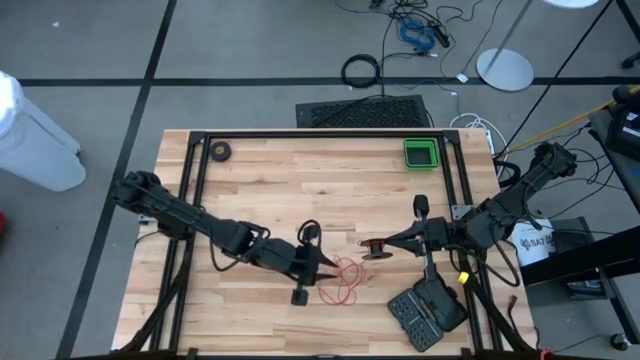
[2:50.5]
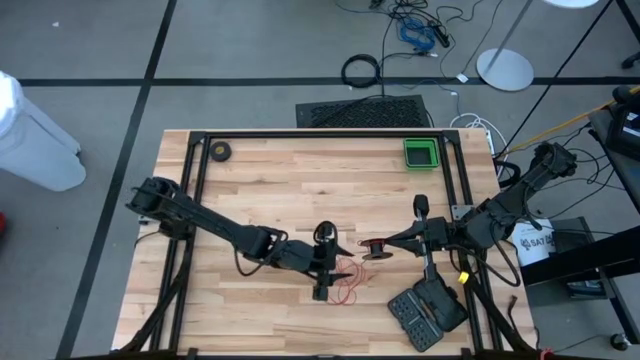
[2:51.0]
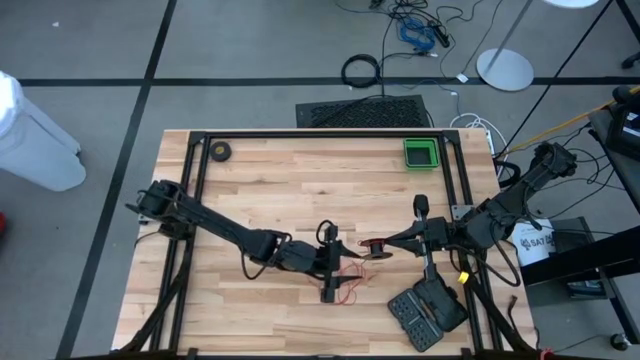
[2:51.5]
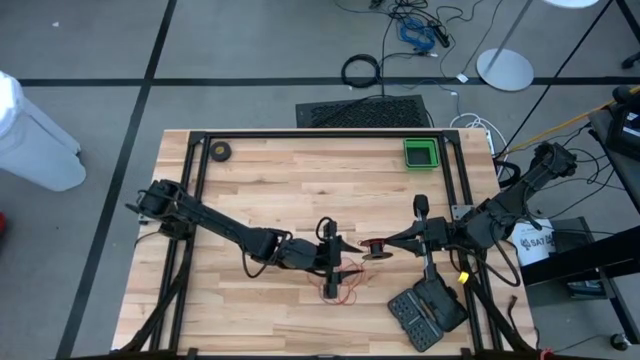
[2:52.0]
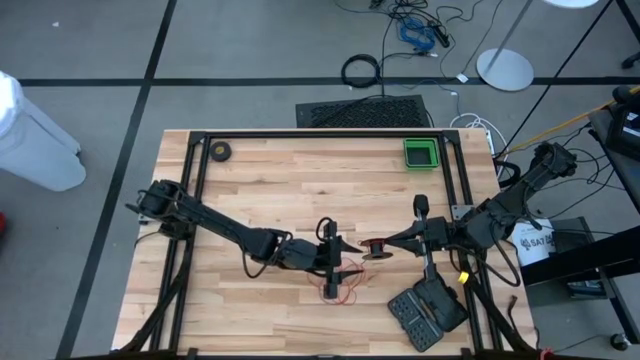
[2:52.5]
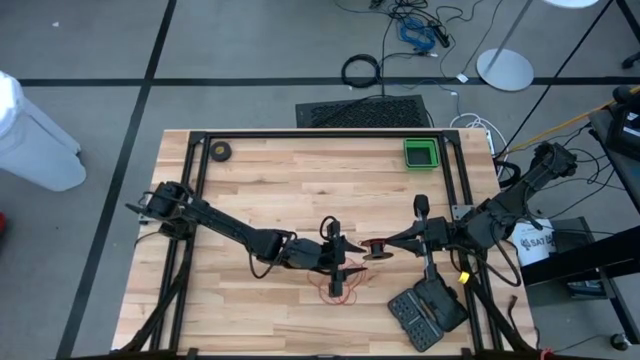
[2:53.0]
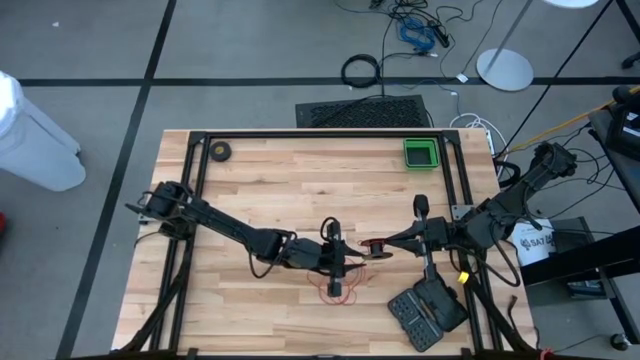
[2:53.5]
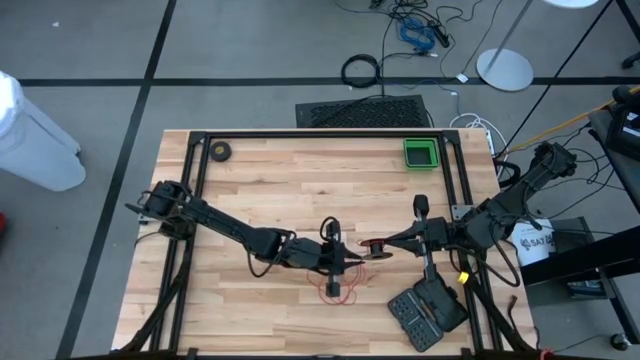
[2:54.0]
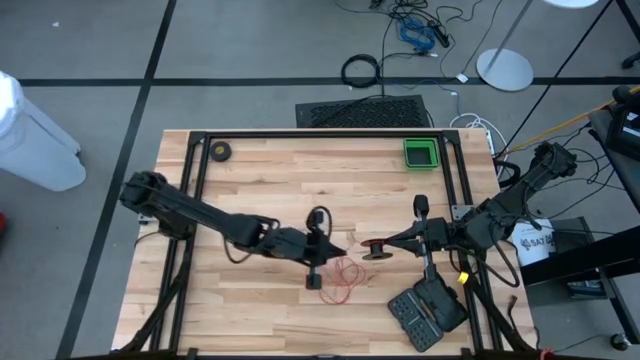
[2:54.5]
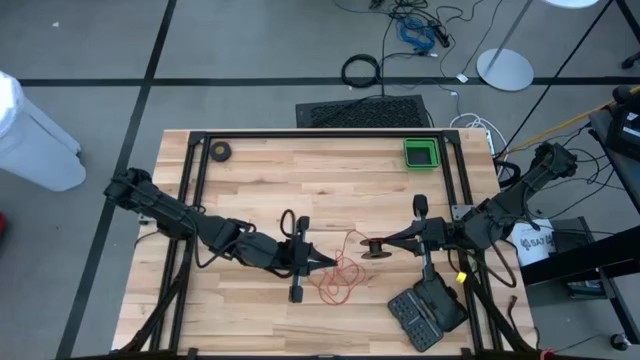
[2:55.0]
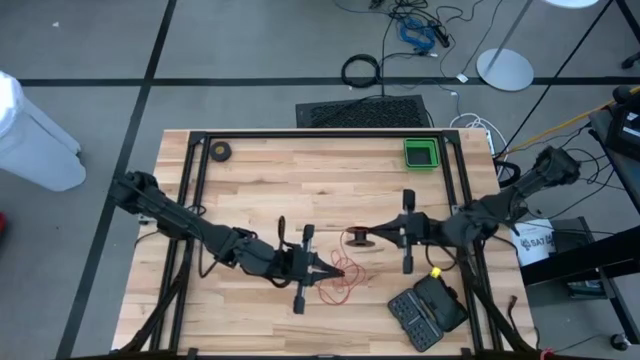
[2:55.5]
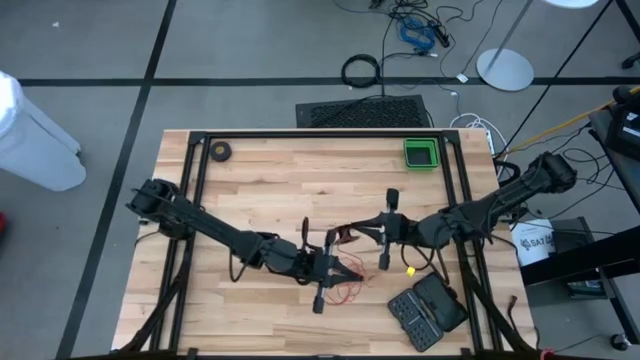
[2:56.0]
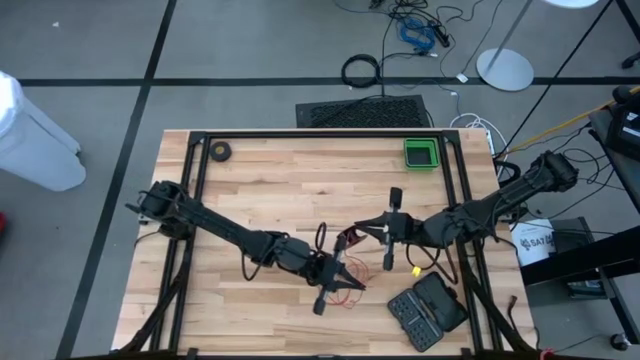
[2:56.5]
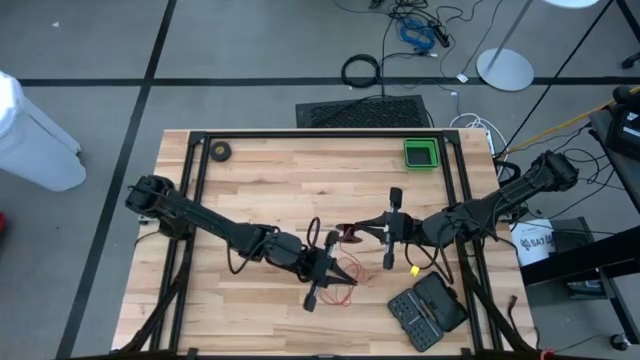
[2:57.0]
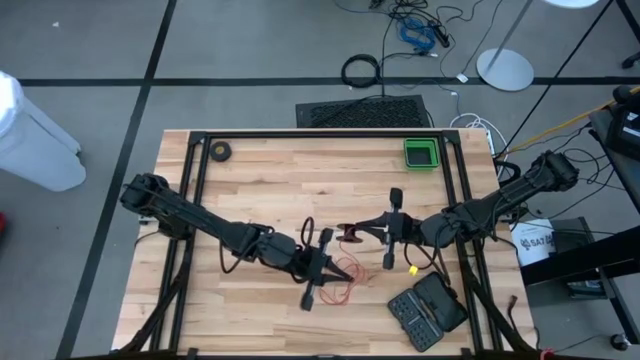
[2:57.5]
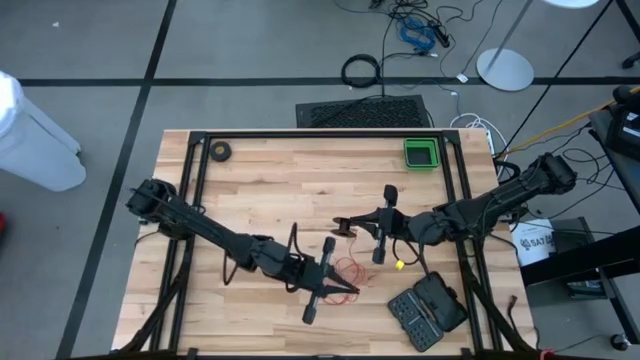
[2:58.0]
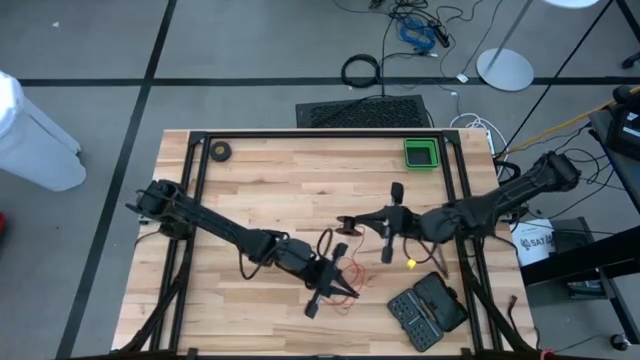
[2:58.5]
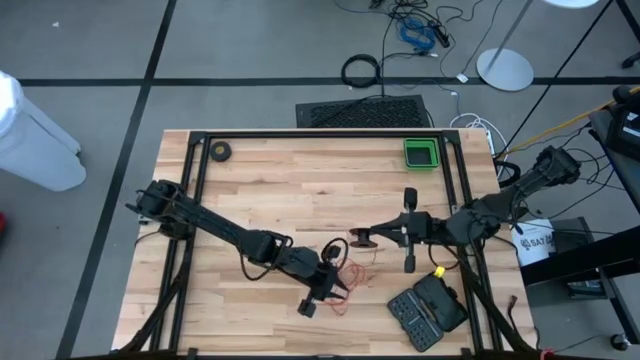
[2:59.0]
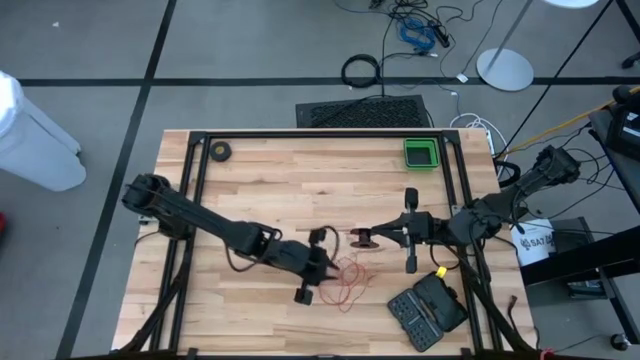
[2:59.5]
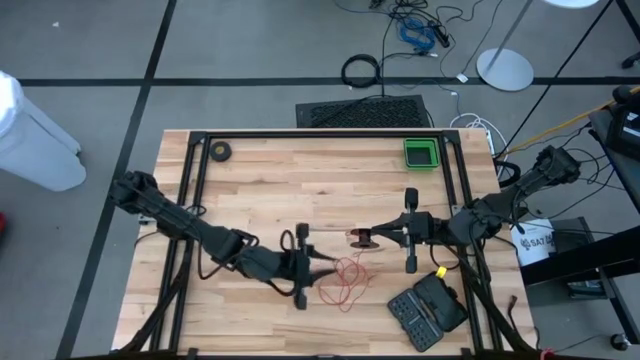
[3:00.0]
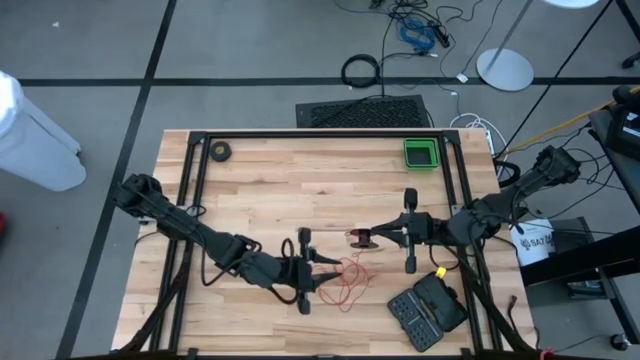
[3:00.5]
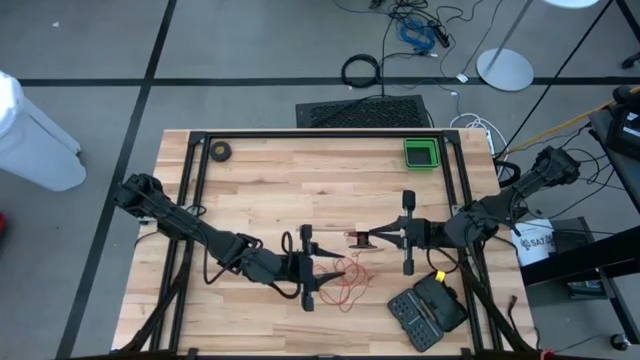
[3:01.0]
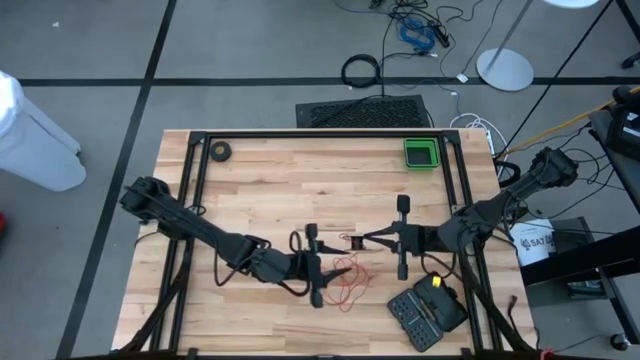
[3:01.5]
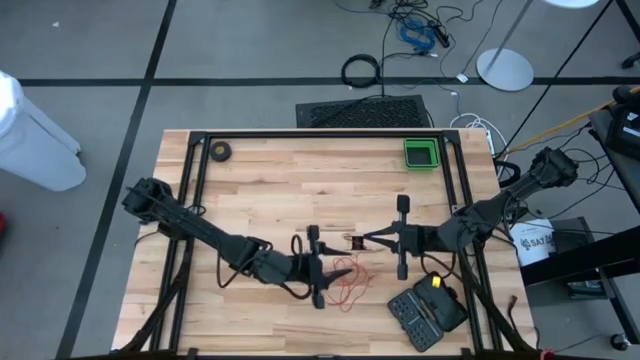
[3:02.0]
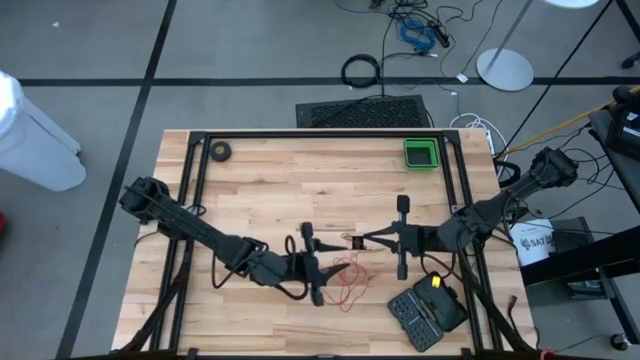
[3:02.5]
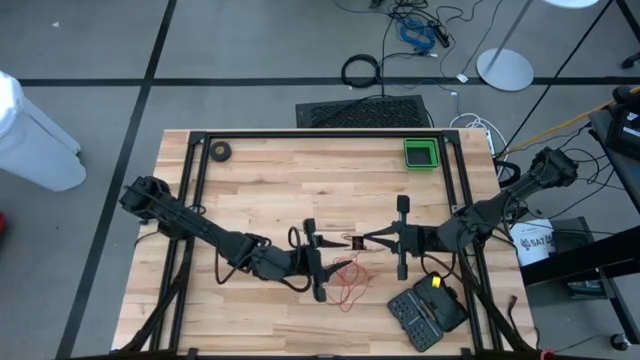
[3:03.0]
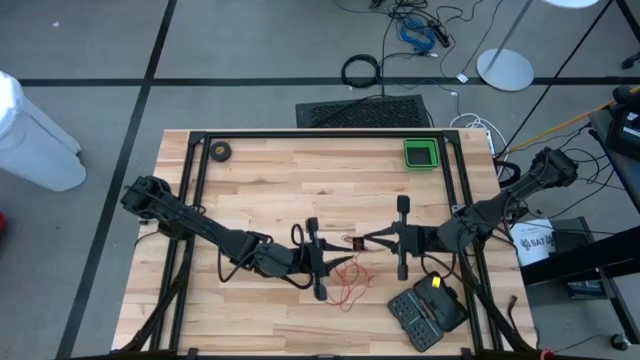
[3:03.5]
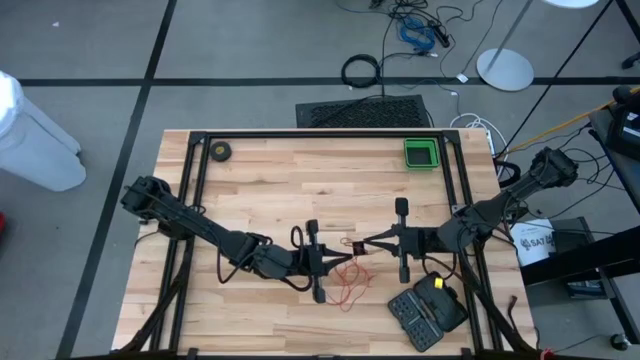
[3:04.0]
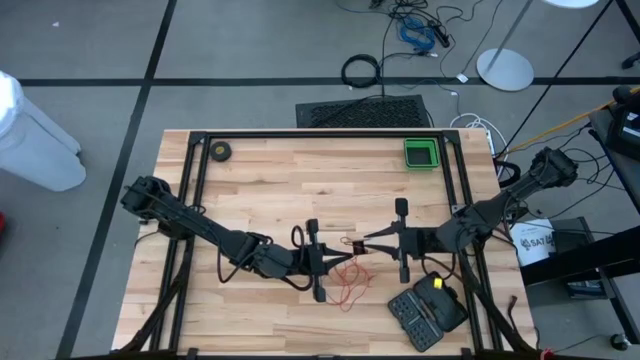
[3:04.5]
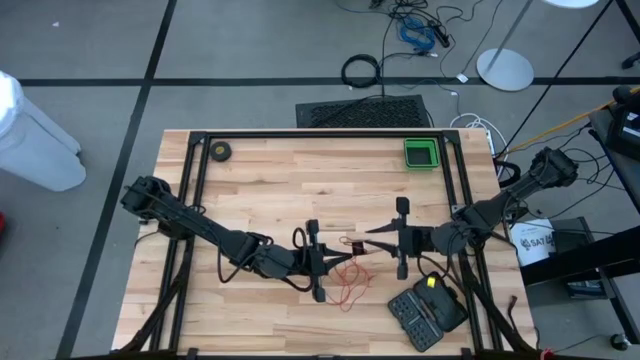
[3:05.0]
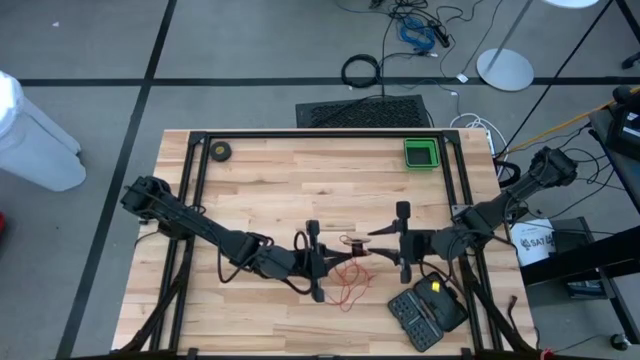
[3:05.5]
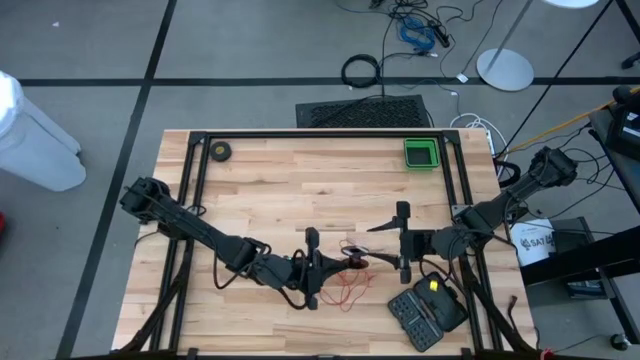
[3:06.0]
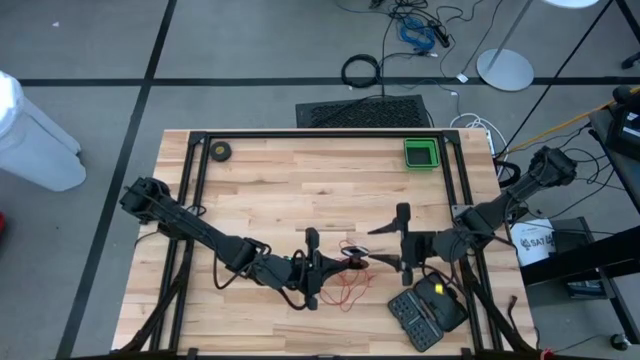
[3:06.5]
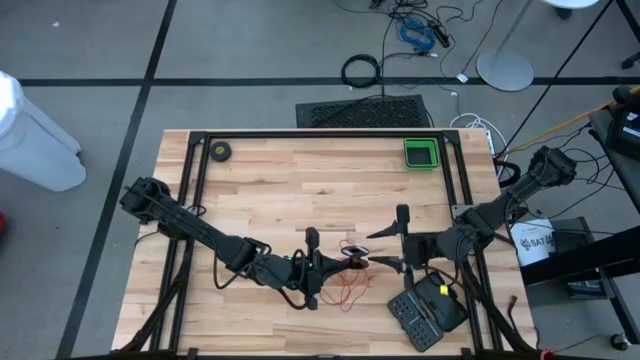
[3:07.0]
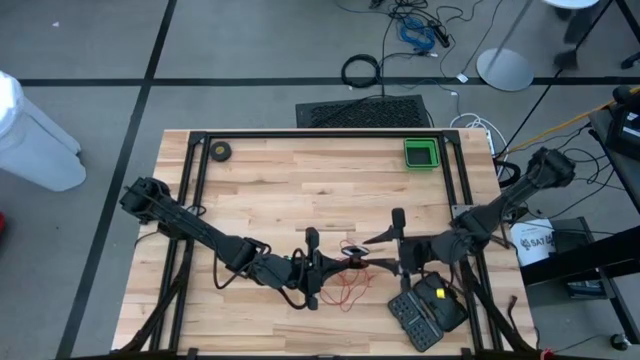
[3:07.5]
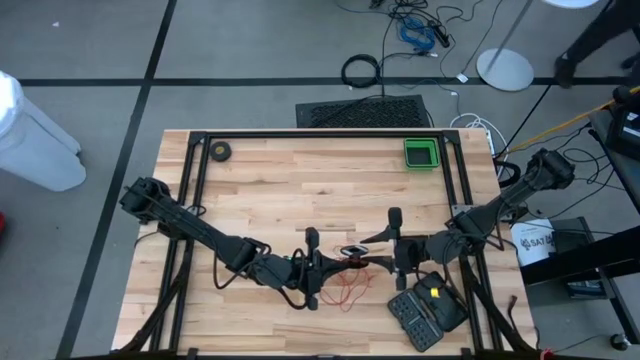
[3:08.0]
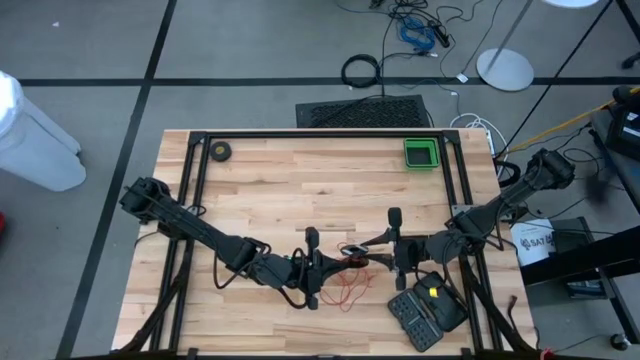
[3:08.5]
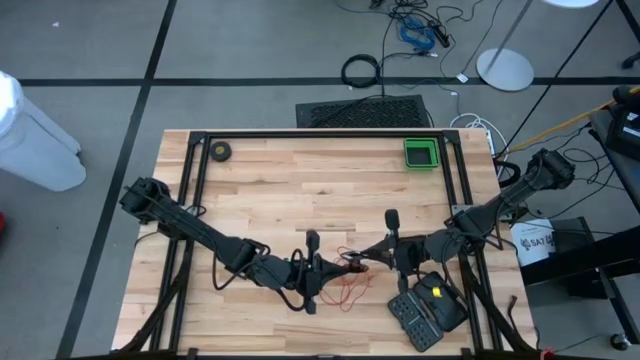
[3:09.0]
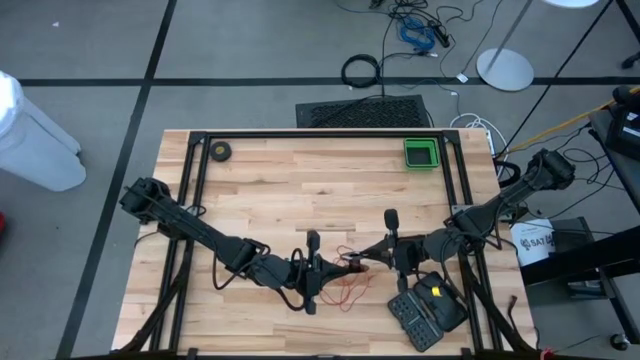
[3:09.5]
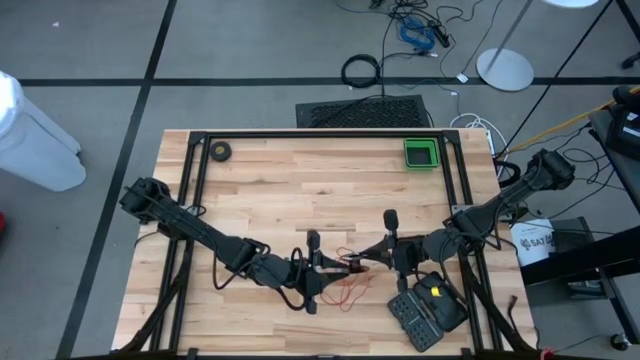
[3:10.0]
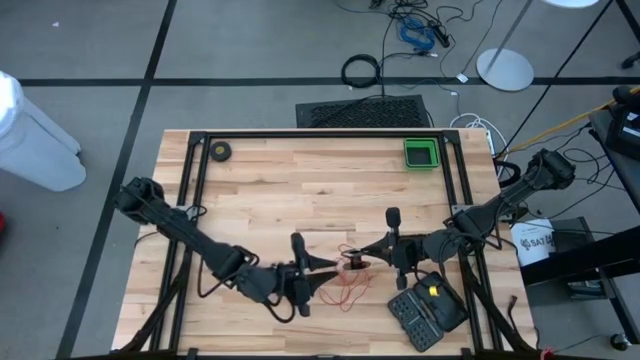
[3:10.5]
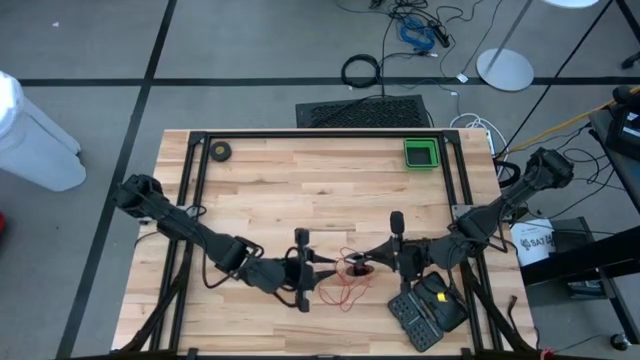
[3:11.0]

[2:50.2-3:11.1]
Task: Coil cords
Uncoil the red wire from the spool
